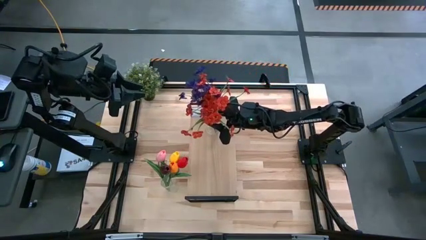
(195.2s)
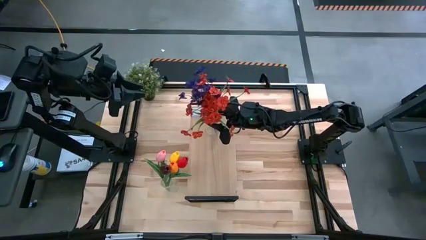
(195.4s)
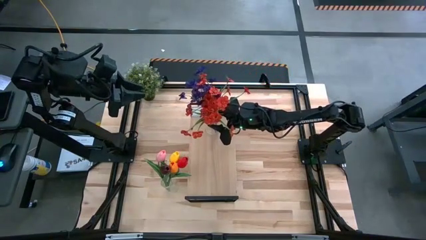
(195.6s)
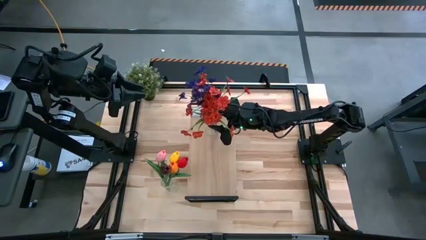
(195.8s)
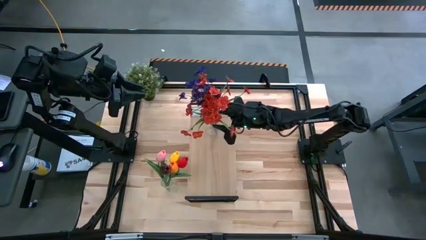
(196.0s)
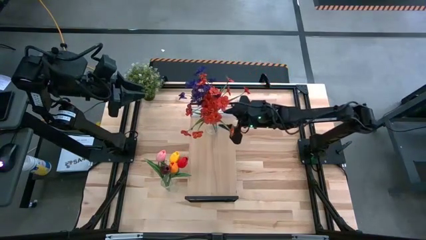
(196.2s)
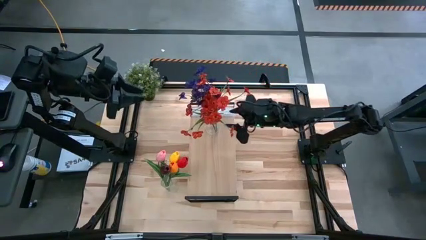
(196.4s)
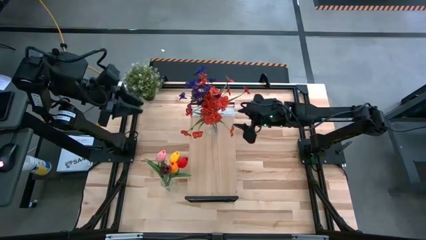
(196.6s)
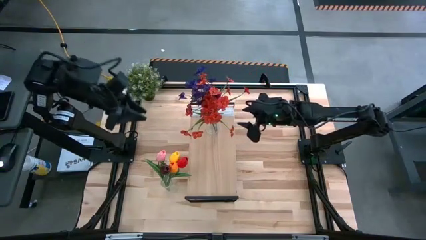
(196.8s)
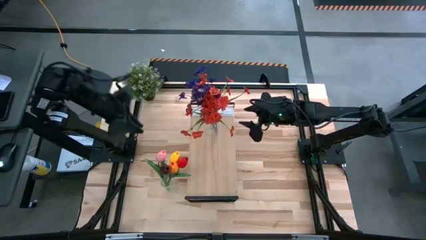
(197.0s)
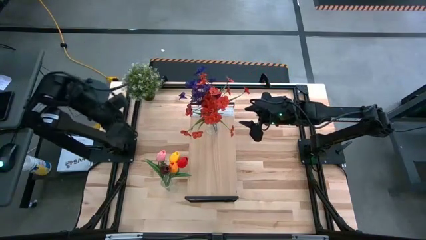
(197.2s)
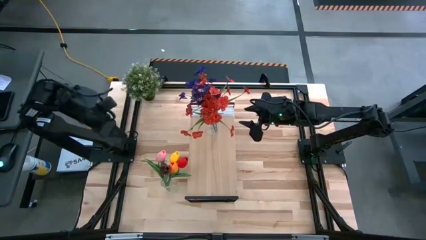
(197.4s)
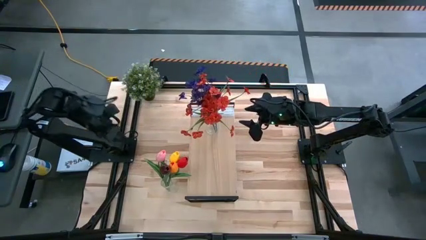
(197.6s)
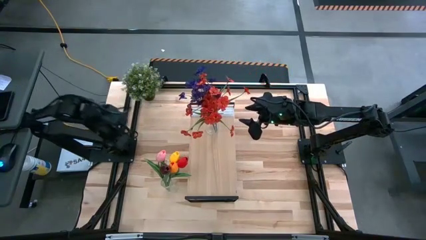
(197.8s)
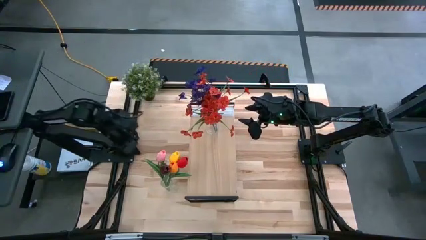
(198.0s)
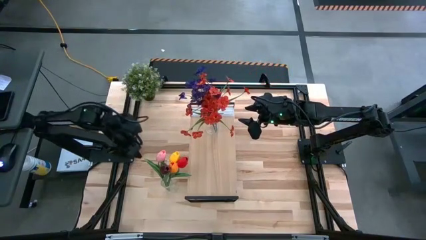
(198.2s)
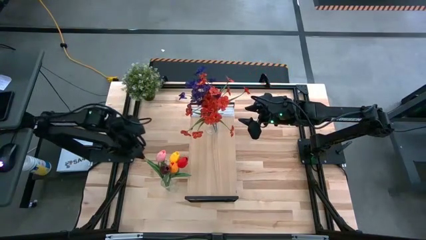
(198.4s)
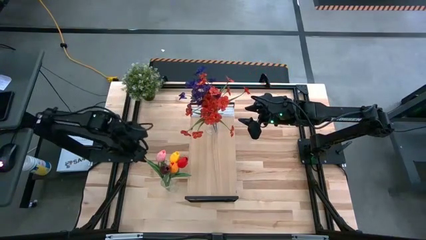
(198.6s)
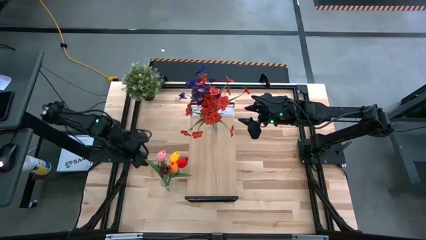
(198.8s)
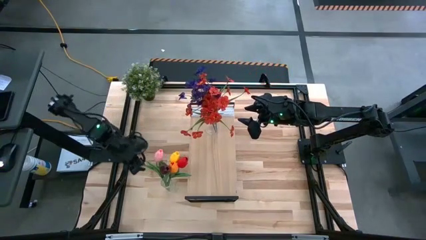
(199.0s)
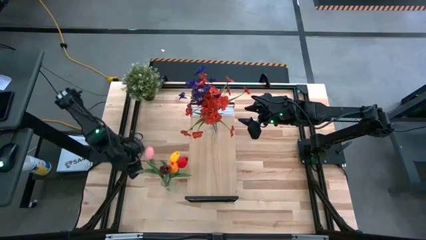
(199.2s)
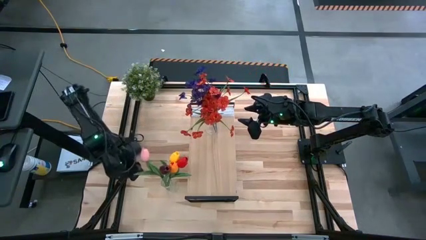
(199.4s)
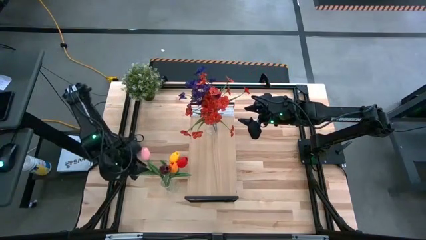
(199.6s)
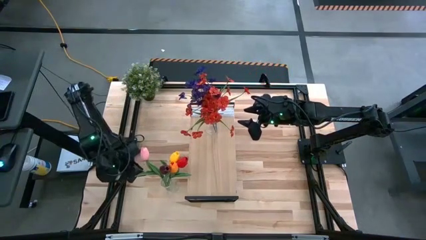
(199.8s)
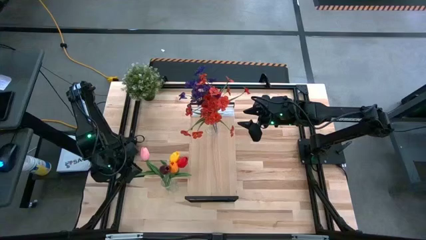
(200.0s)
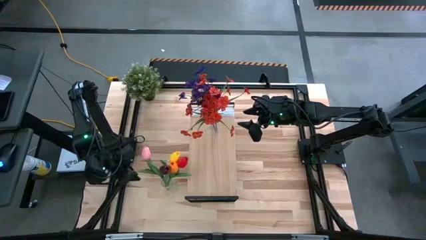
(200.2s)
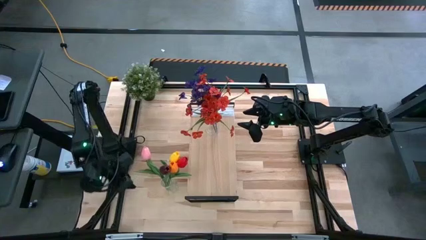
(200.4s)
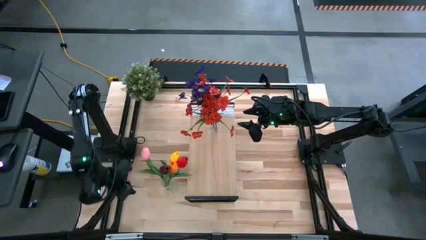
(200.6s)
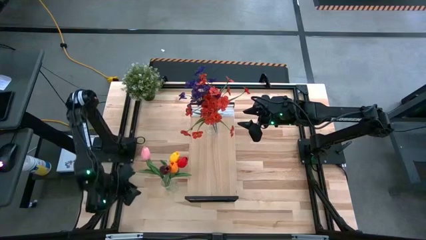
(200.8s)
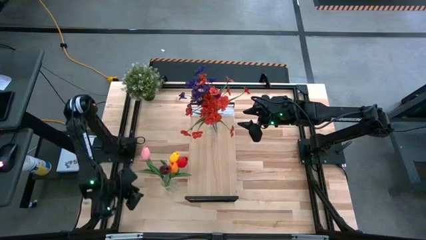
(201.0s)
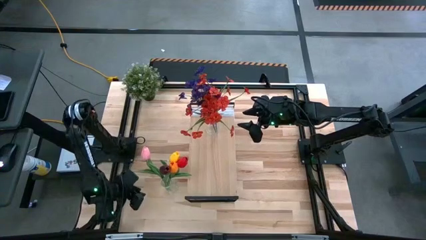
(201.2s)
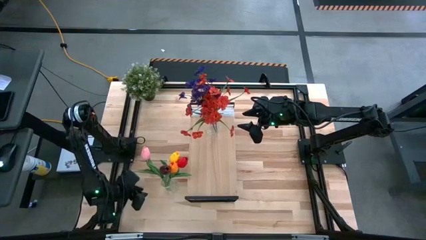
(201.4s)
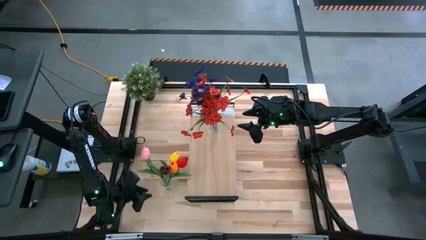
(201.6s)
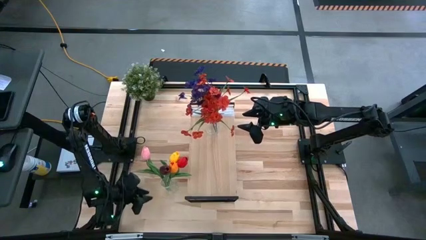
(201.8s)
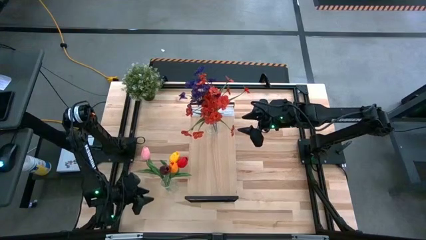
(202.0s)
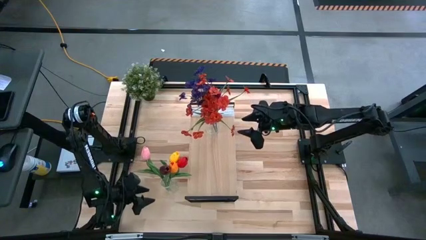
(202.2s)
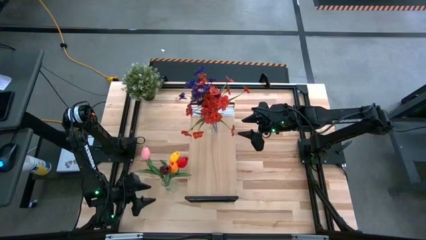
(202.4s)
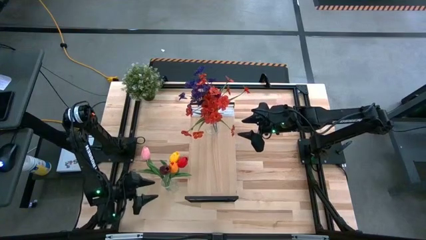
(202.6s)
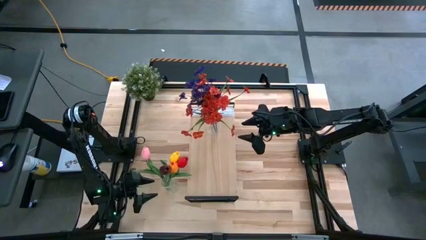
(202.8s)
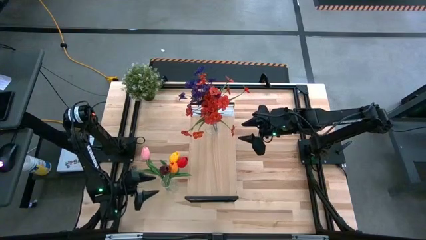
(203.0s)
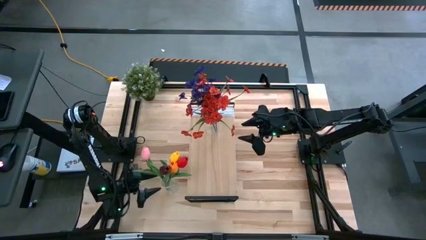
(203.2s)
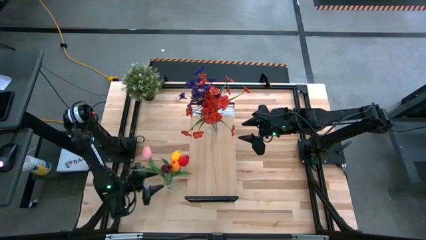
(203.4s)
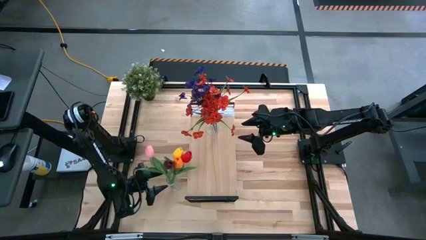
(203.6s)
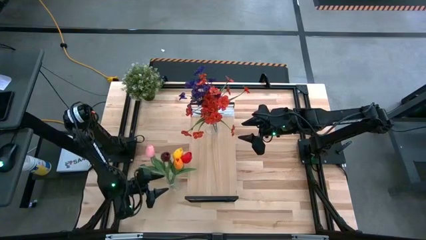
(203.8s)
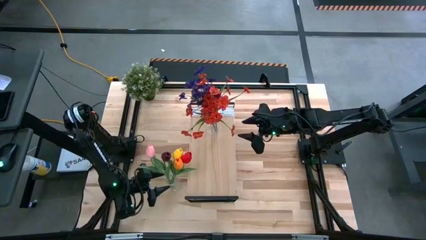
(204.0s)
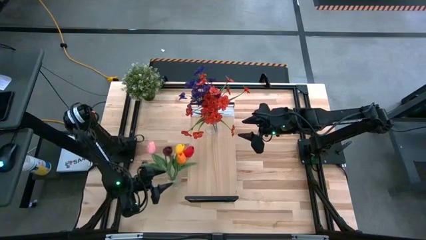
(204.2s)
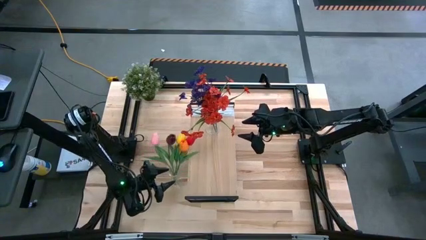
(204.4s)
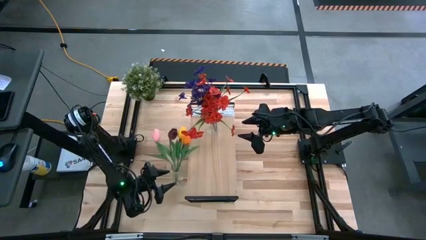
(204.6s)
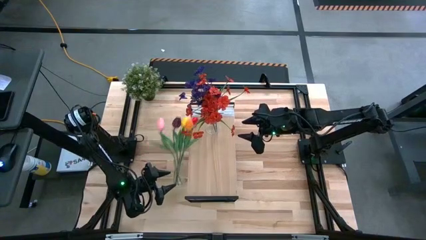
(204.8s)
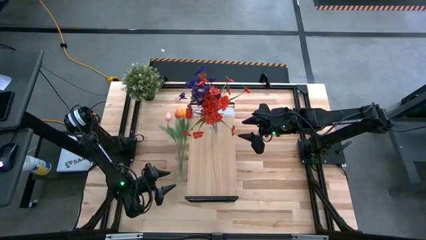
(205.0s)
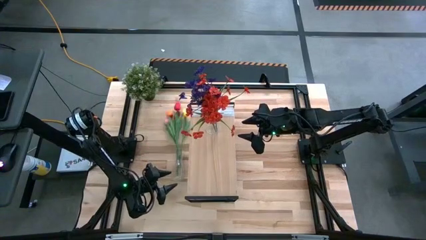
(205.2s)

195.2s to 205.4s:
Task: Pick and place flowers into a vace then onto a shelf
Put the flower vase on the shelf

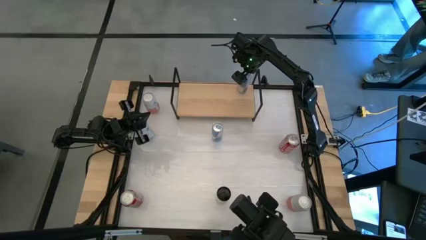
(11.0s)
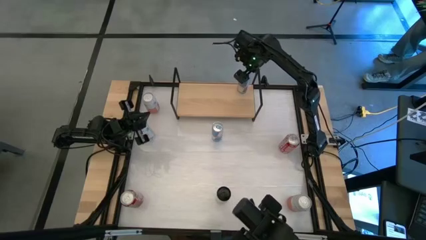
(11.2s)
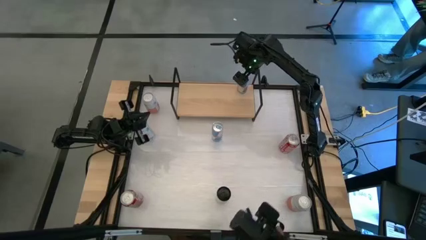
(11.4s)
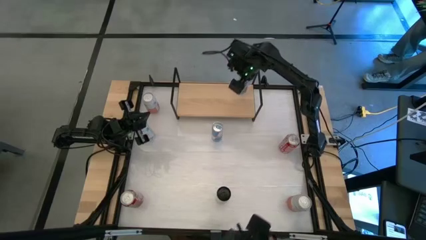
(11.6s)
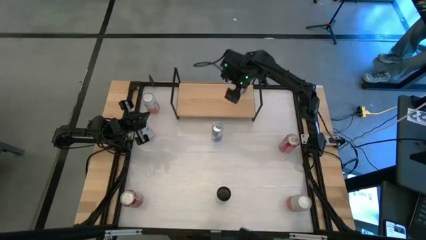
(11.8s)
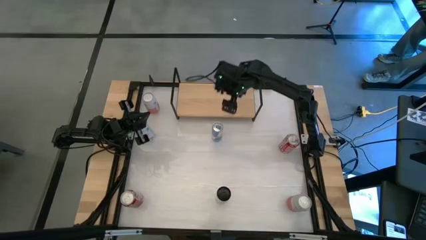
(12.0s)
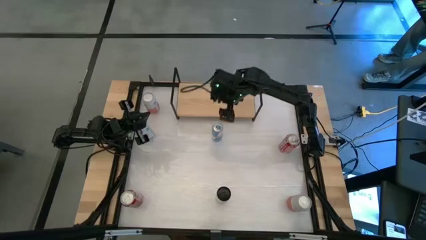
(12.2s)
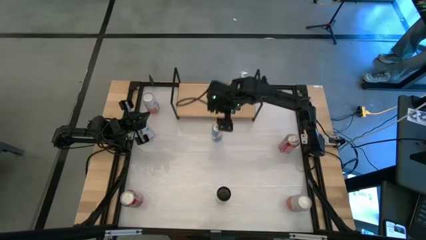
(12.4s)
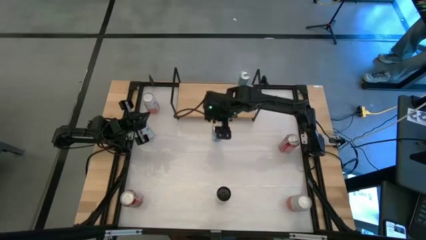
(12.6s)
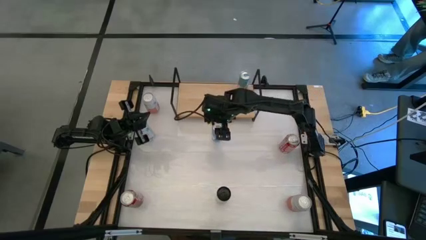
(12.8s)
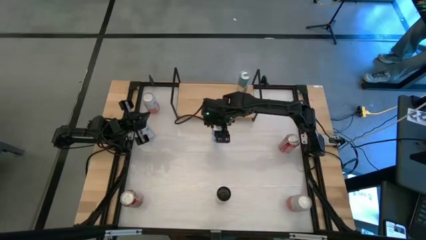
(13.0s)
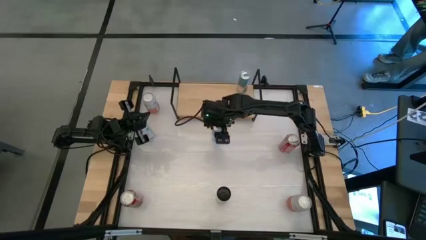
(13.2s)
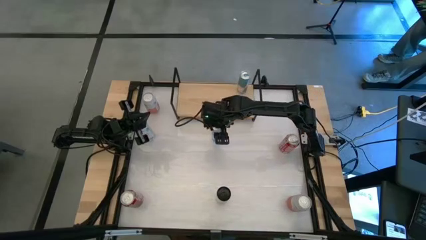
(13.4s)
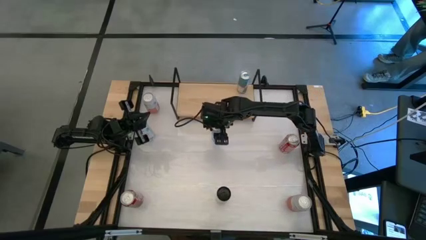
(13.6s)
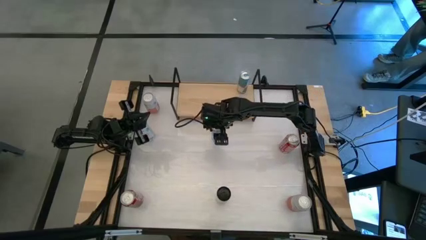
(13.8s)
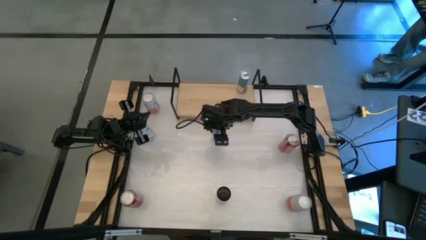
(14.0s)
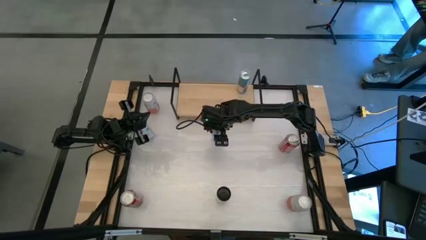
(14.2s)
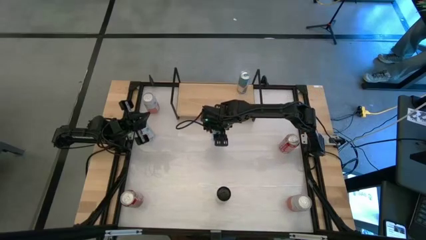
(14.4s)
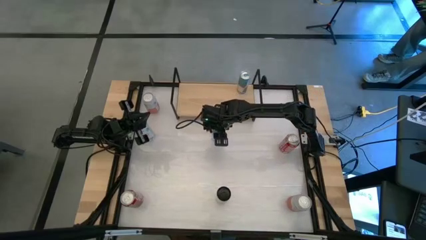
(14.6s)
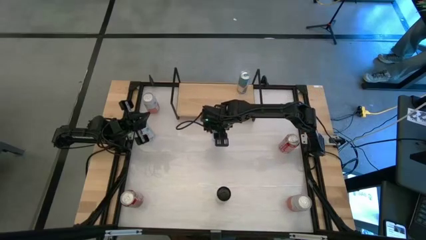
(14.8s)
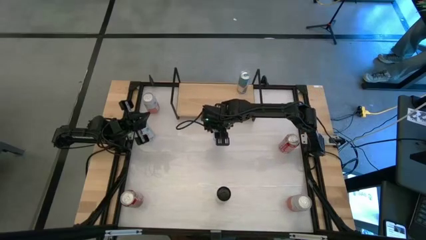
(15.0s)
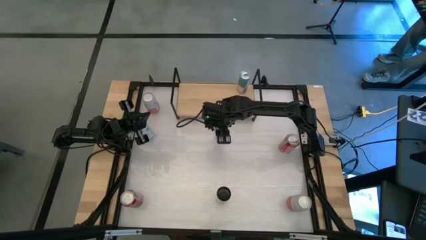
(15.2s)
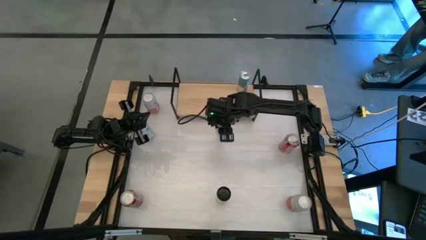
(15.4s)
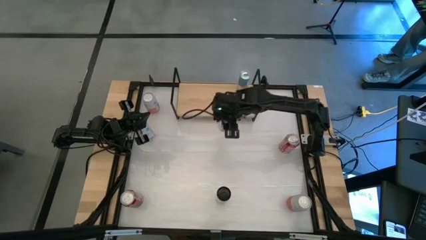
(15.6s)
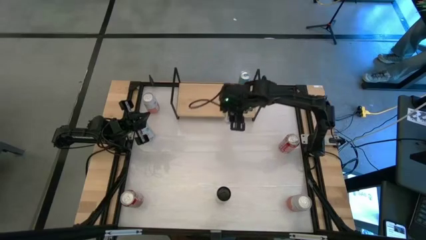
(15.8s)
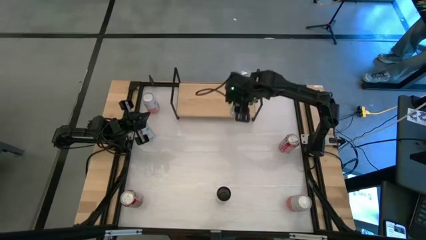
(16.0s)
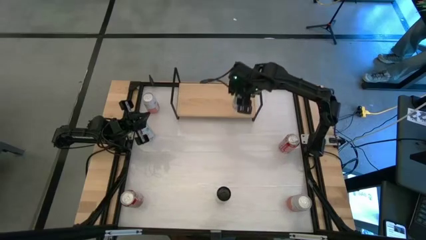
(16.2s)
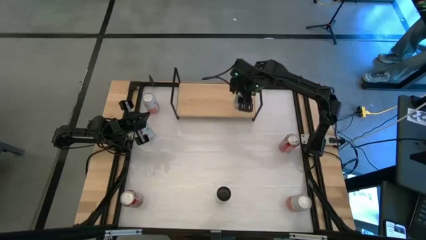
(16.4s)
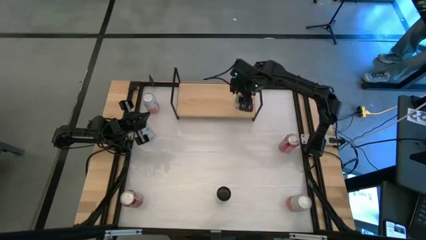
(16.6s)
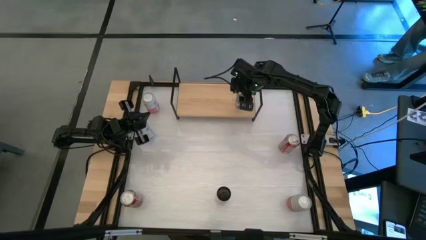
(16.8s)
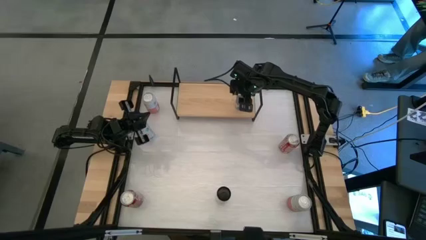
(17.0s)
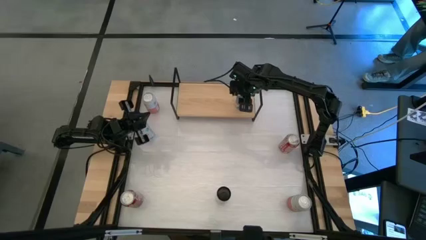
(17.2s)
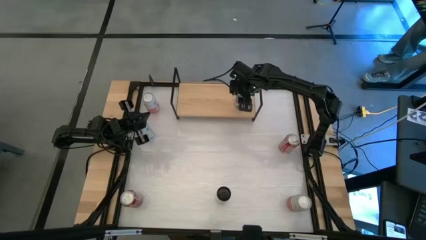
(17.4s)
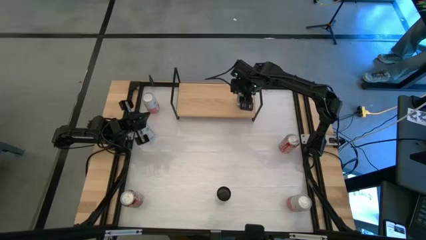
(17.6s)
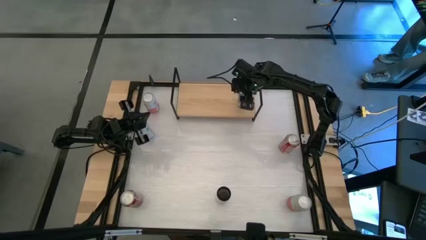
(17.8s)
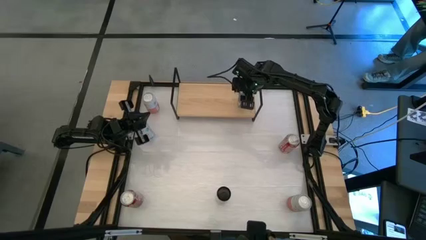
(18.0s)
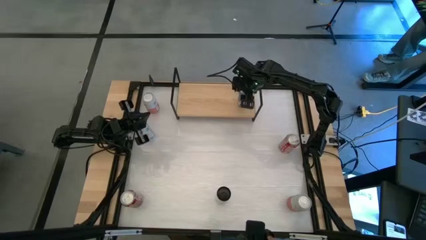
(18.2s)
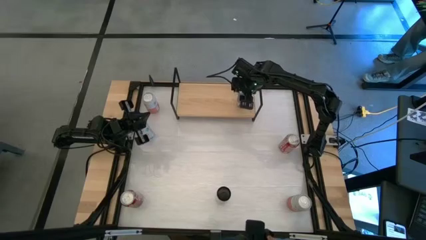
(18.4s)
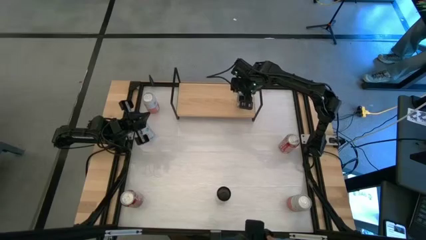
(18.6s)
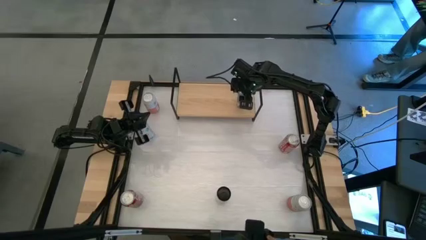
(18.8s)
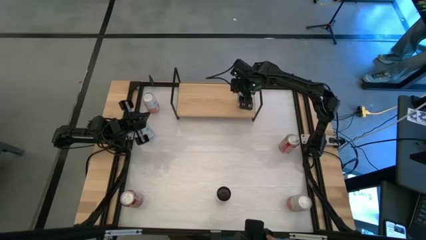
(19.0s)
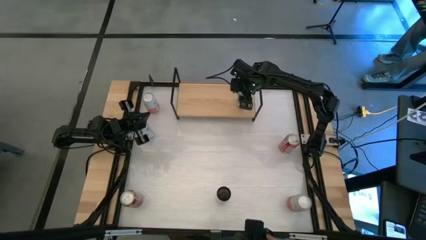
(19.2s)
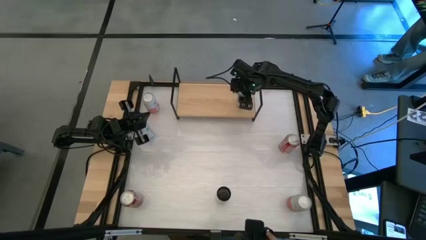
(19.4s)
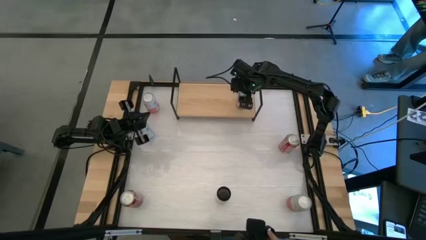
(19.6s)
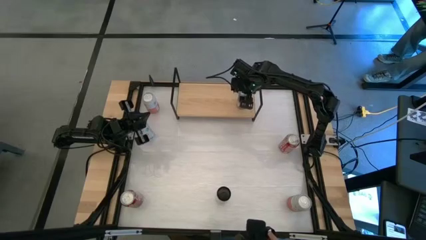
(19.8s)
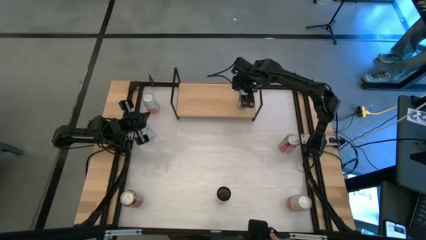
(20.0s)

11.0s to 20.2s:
Task: Place canned beverage on shelf
Put the blue soda can on the shelf
